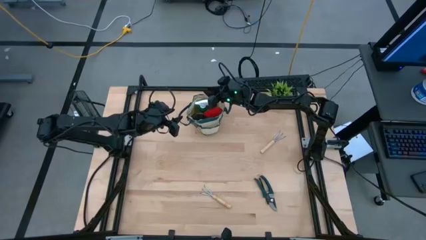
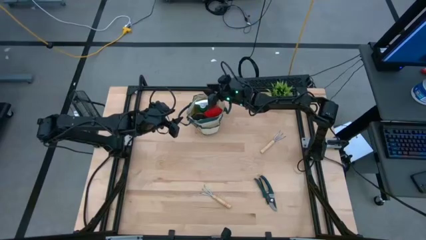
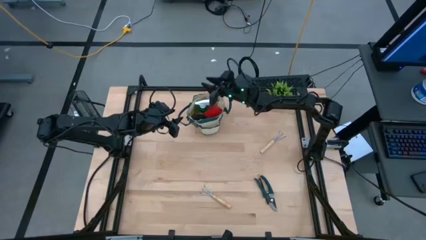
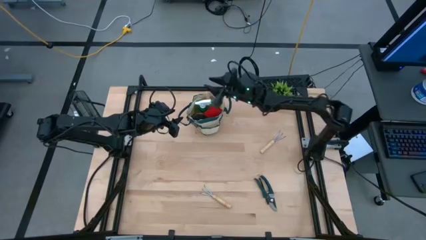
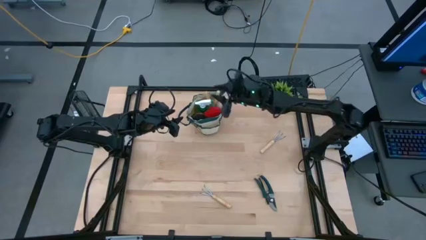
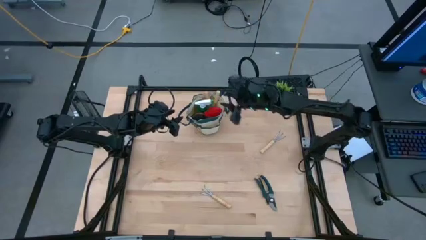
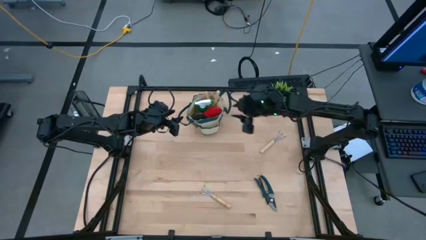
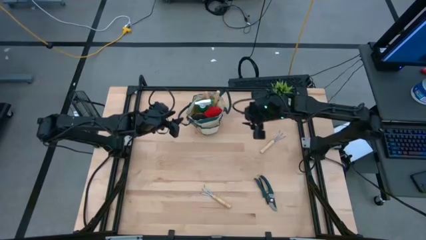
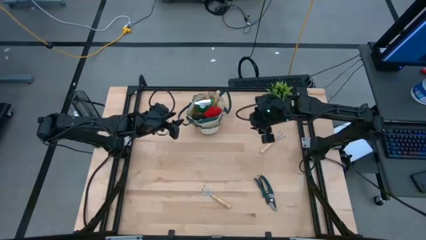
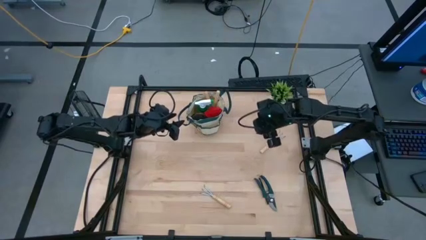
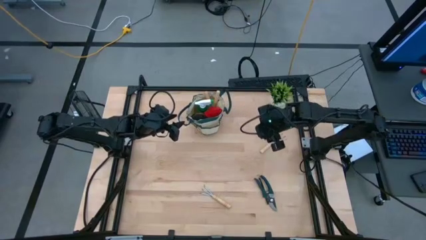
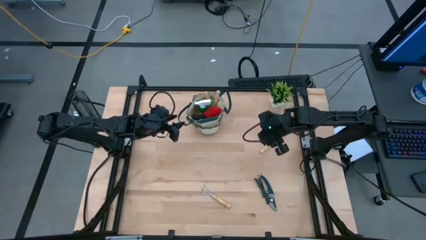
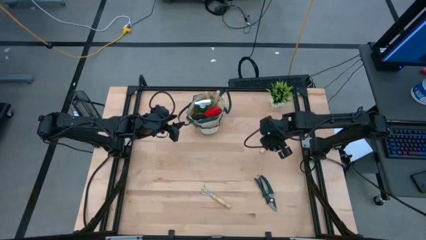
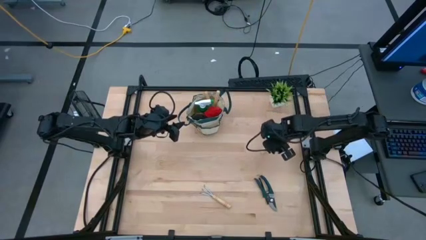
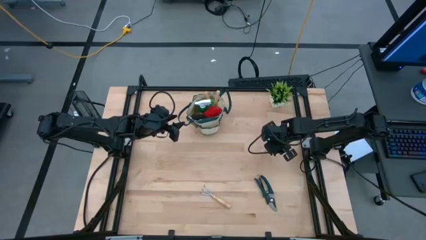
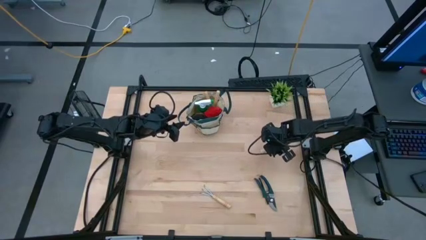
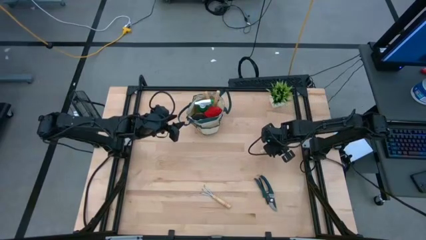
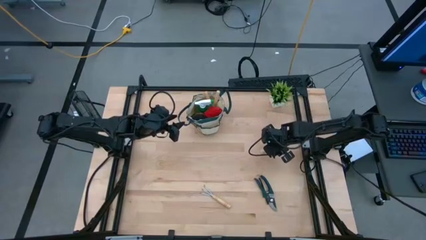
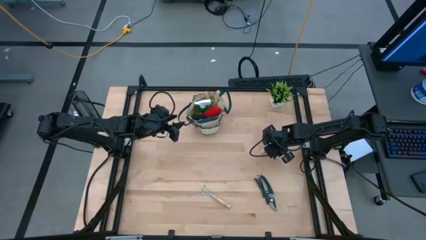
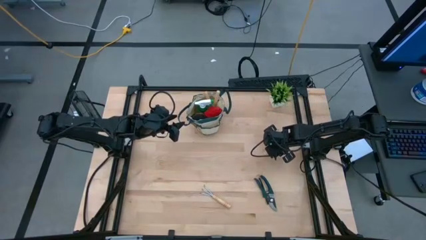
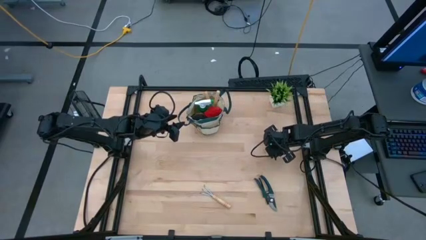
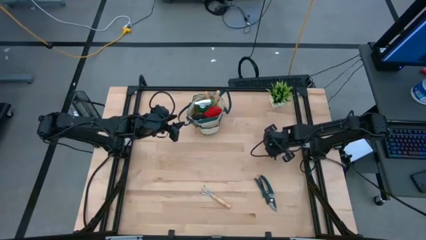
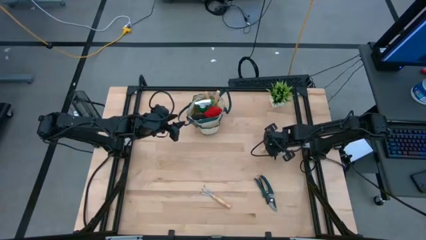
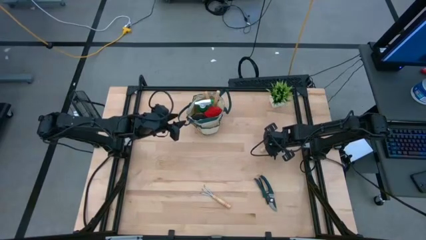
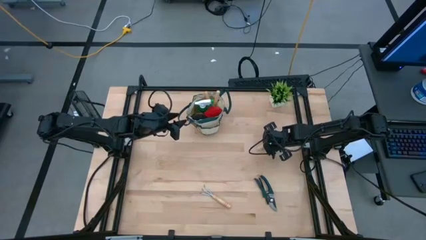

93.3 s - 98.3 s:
Task: Pick & Place Garden tools in Gardening bag
Put the top hand rake into the gardening bag

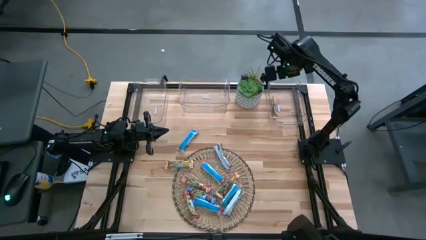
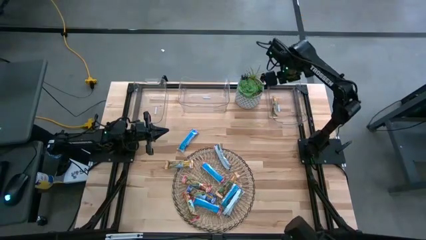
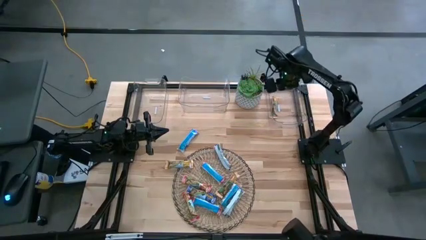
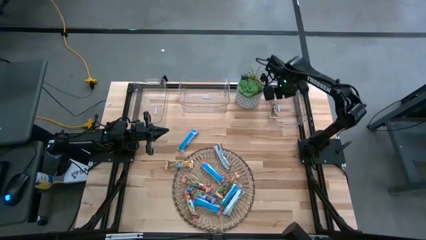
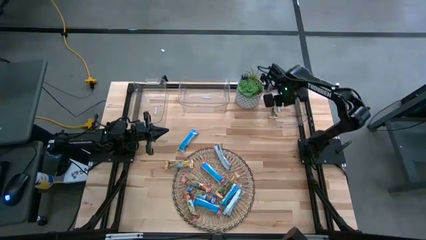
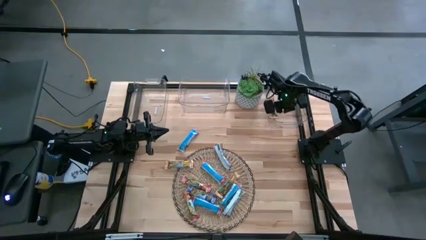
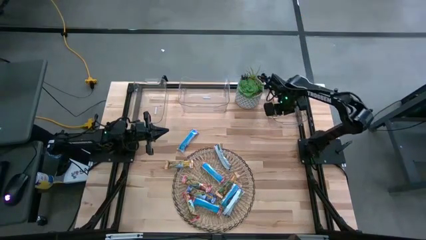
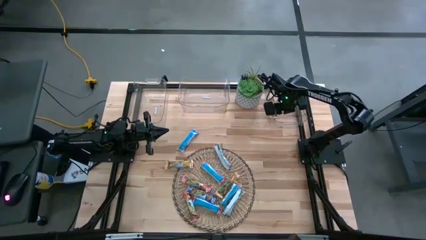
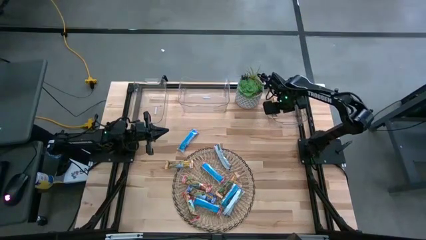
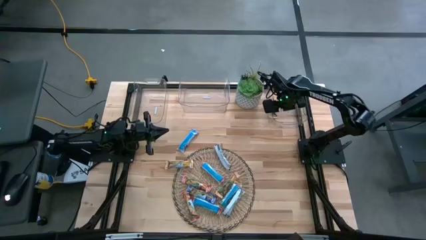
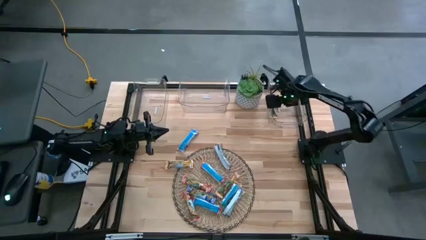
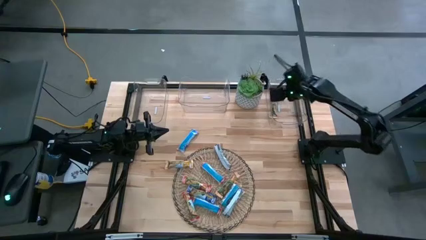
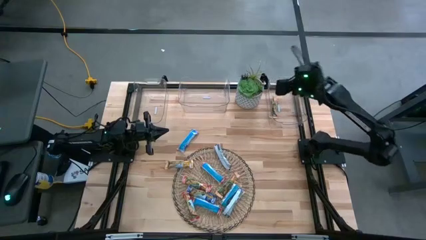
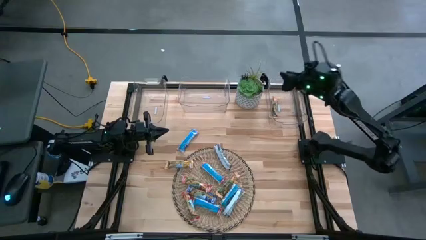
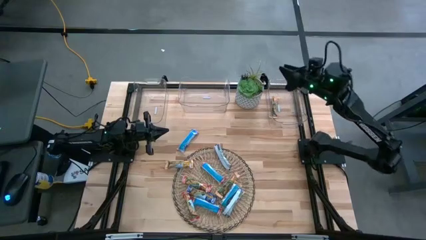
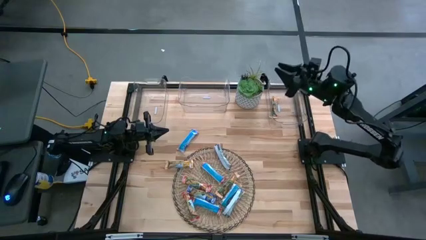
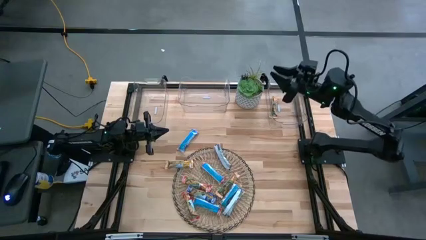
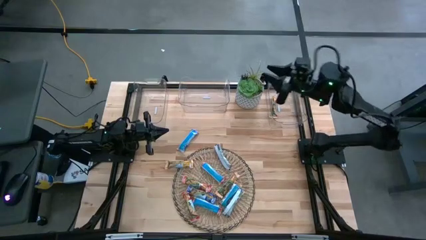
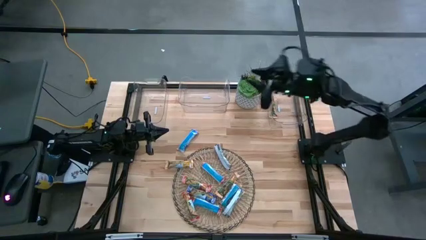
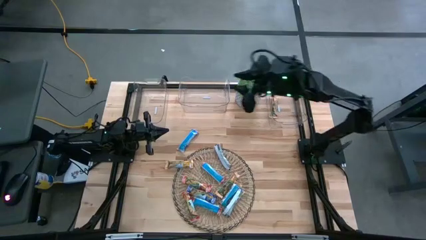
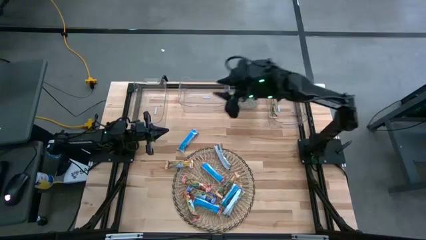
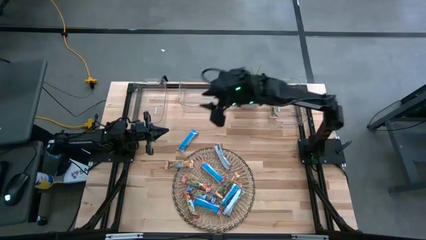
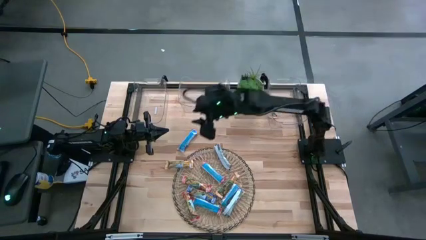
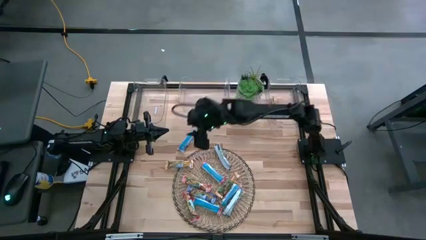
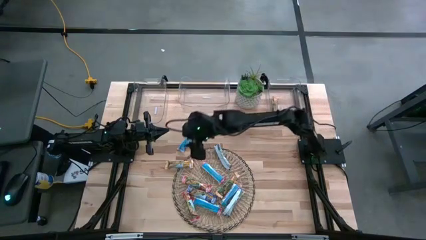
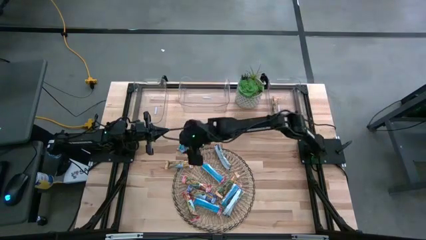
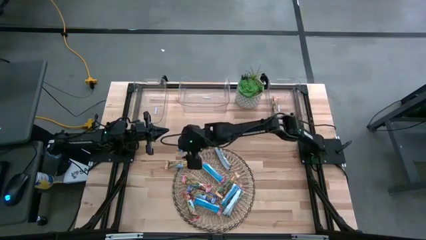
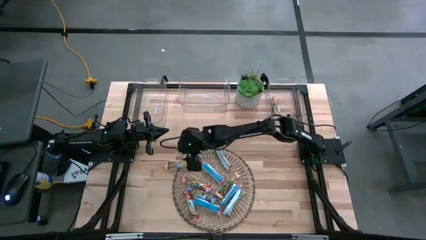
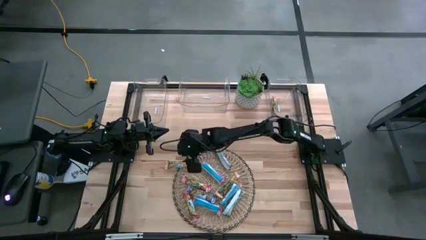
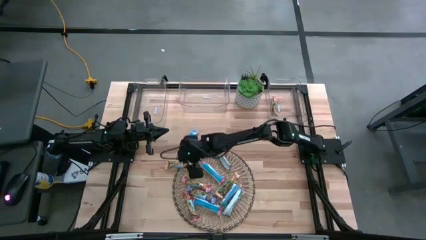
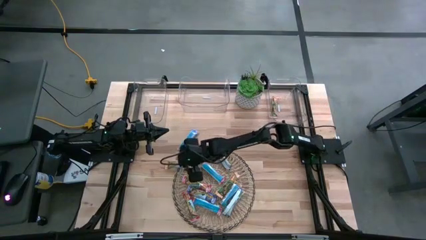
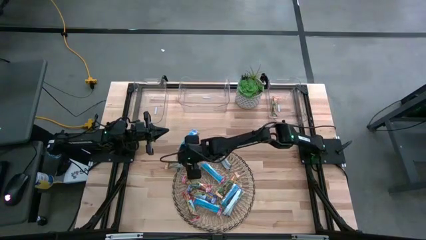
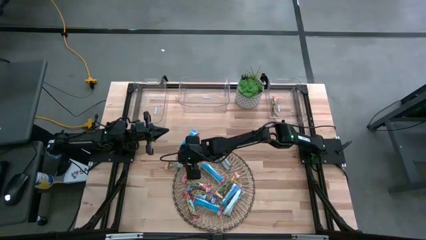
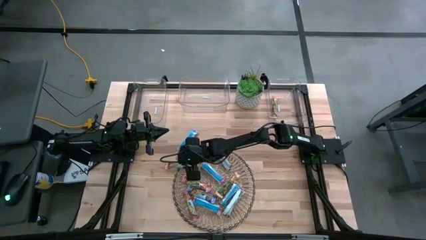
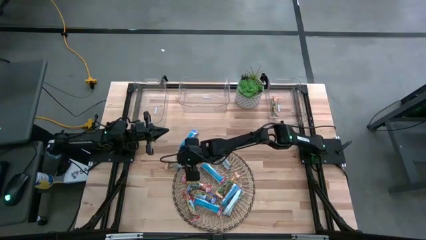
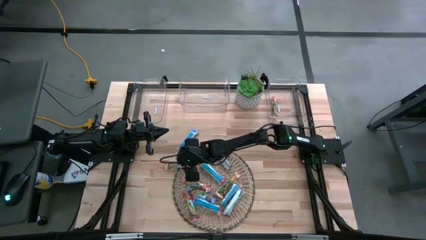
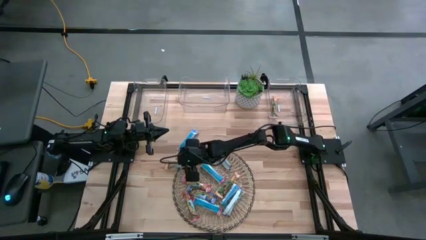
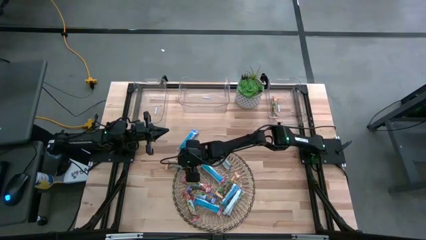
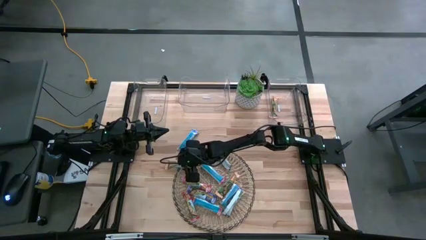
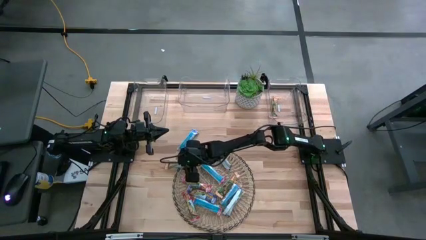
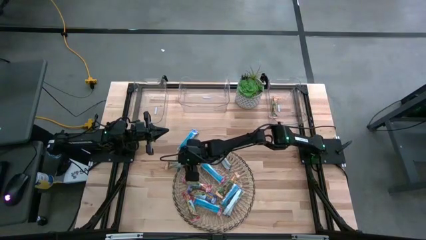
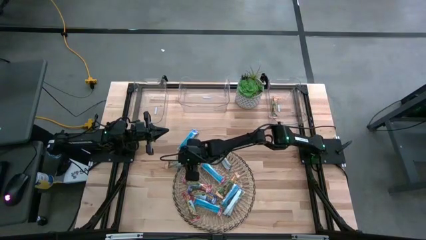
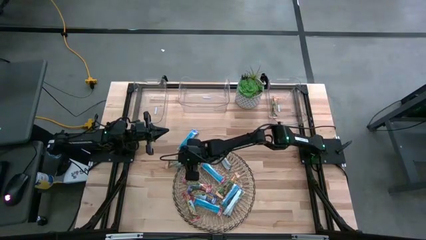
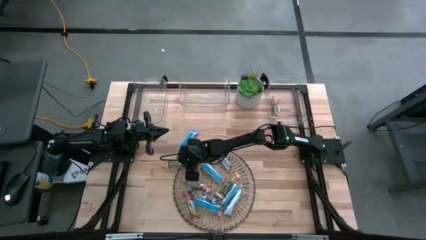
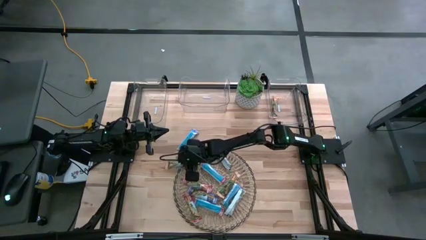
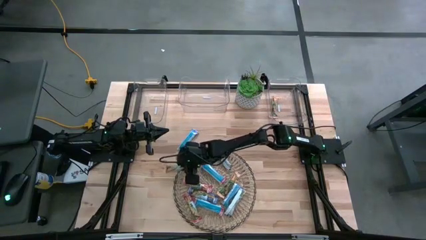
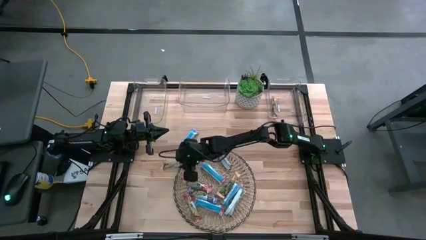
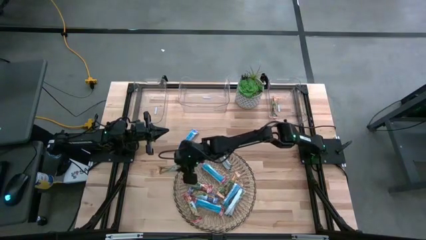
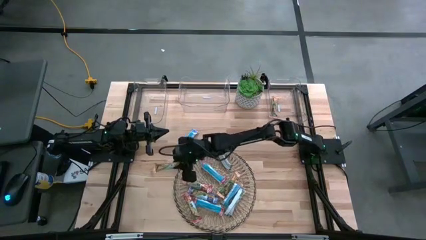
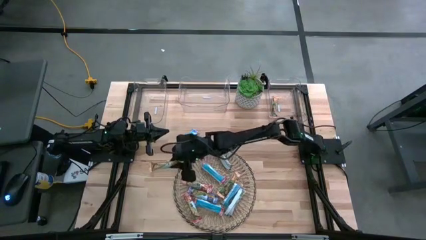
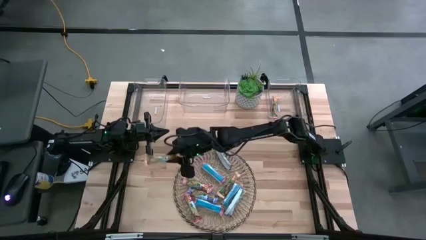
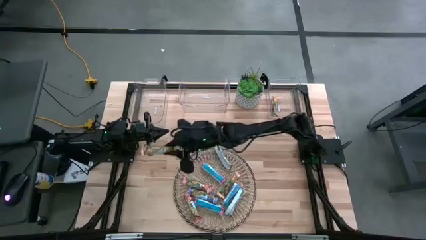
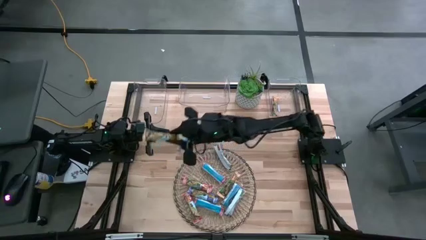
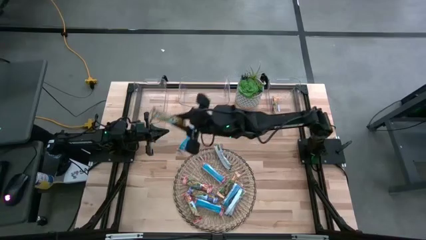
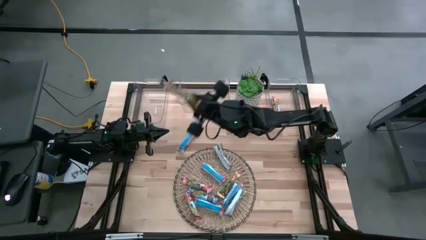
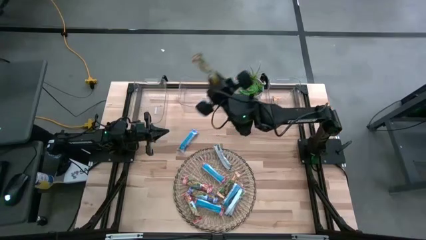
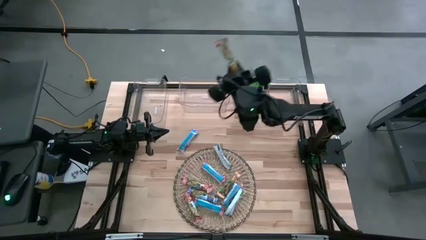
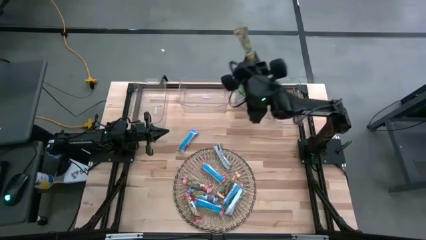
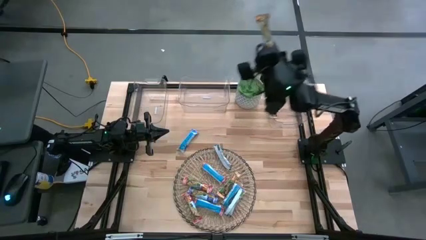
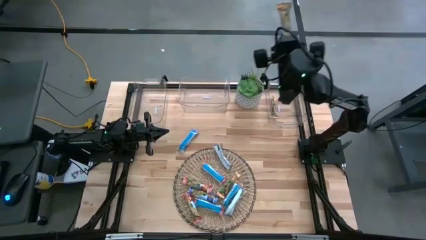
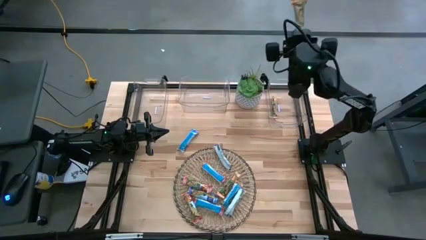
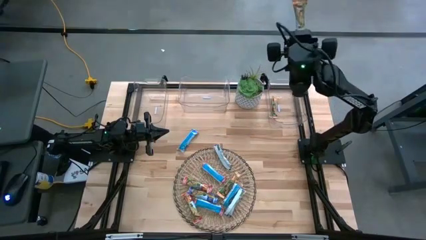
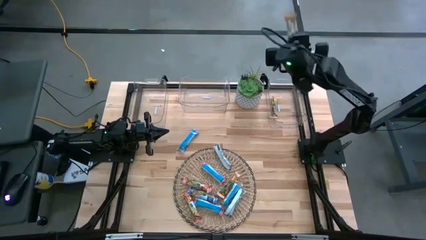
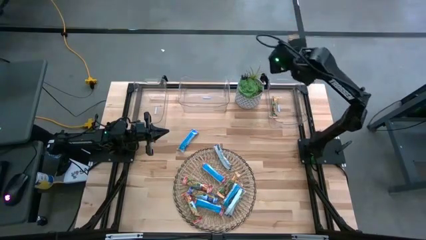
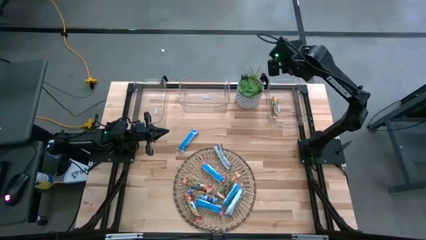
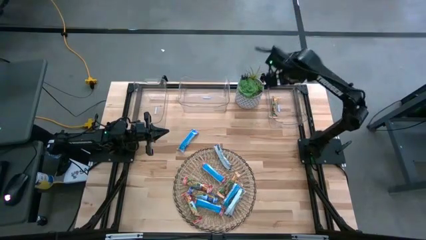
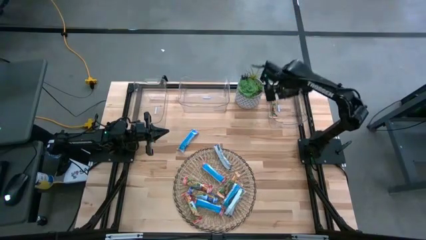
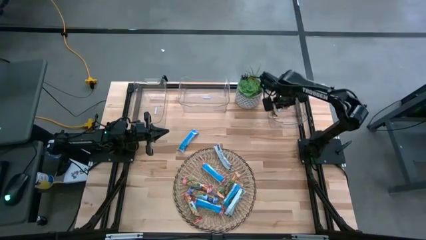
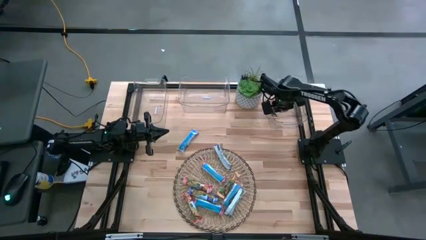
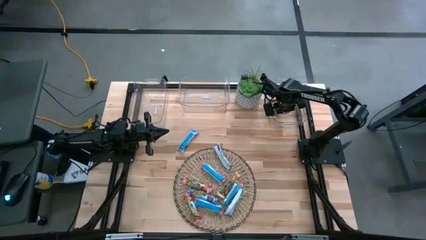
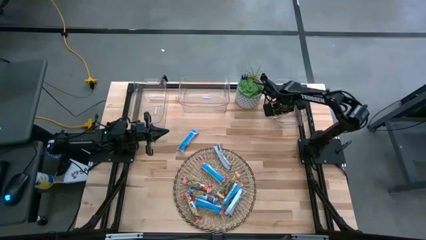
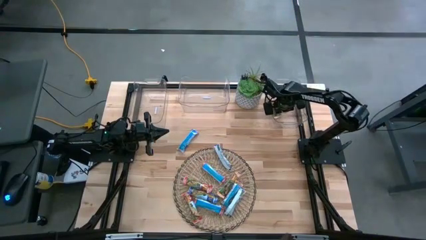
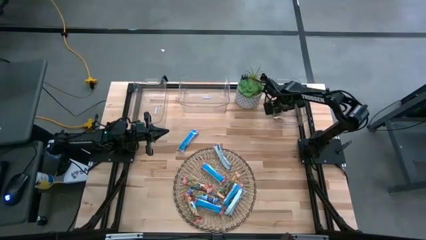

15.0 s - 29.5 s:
Task: Pick and place Granola Bars by type
Put the yellow granola bar into the right transparent bin
